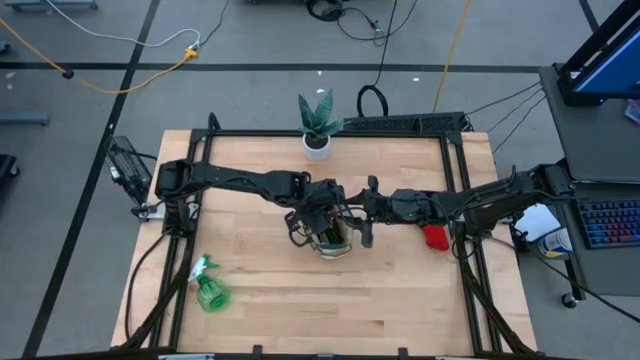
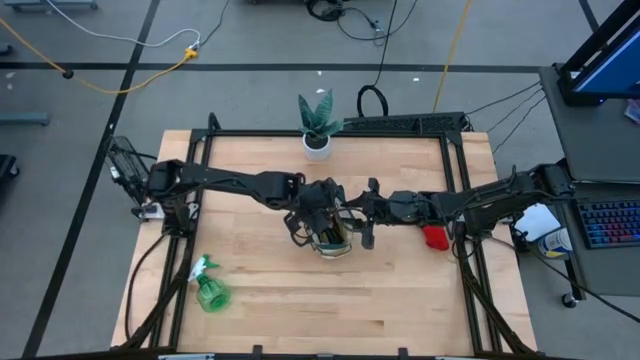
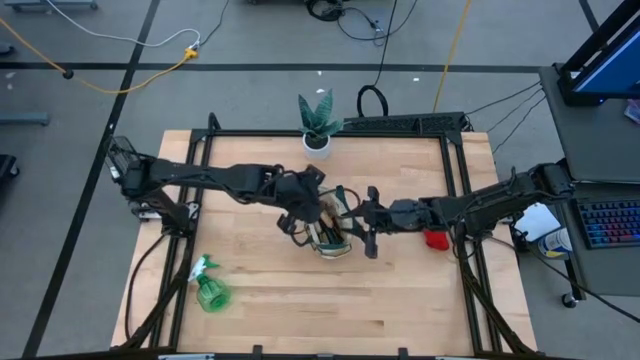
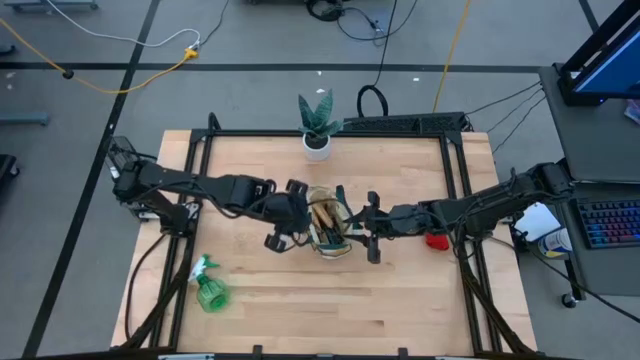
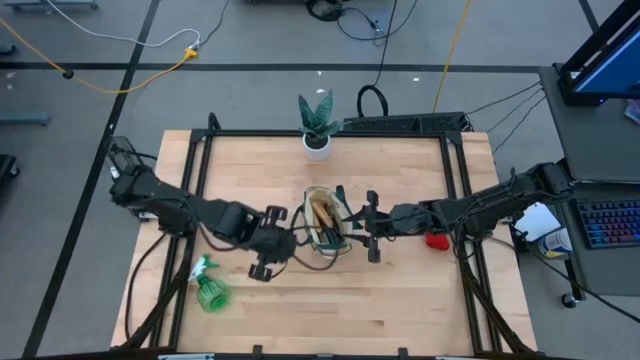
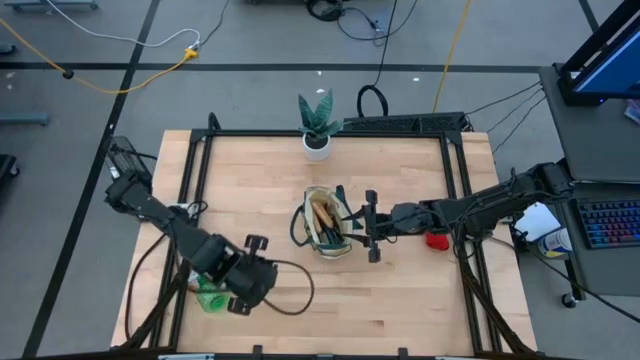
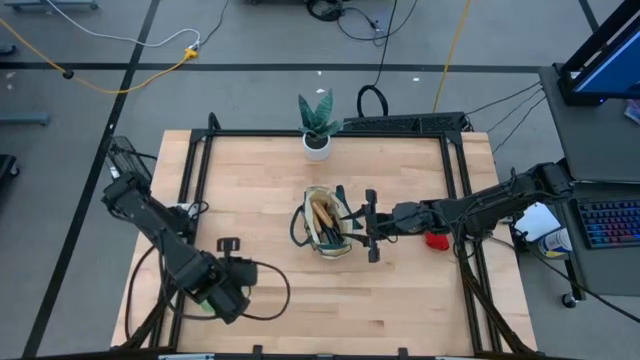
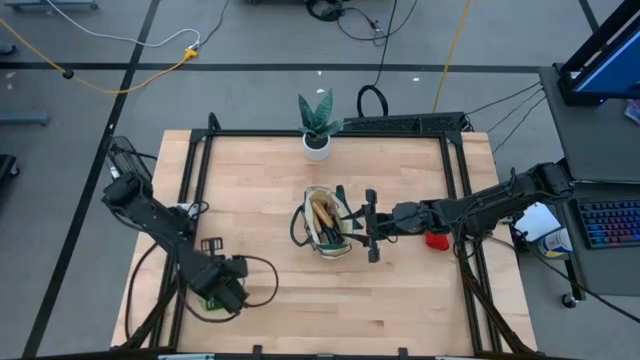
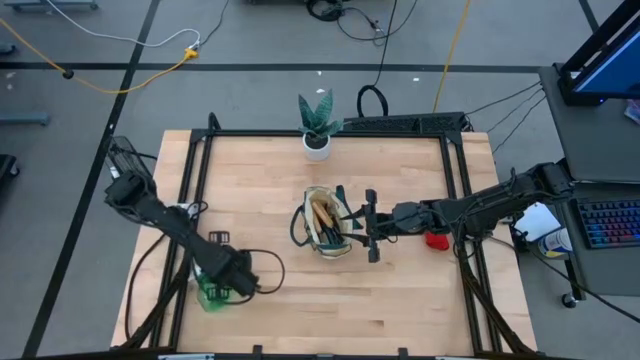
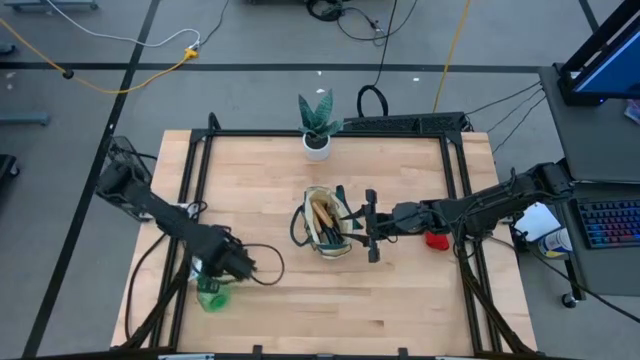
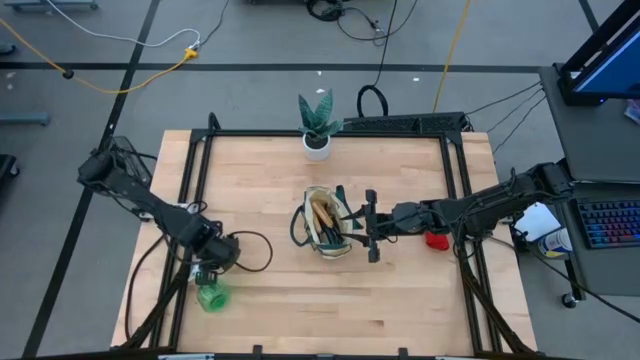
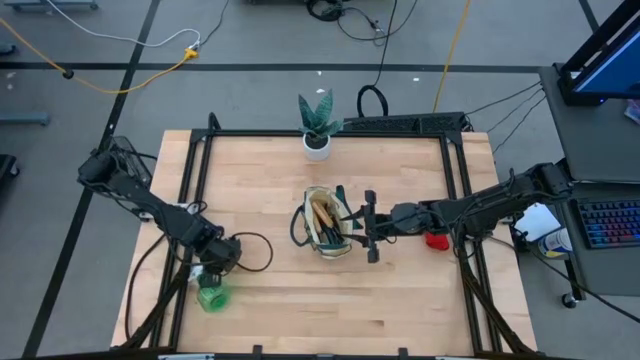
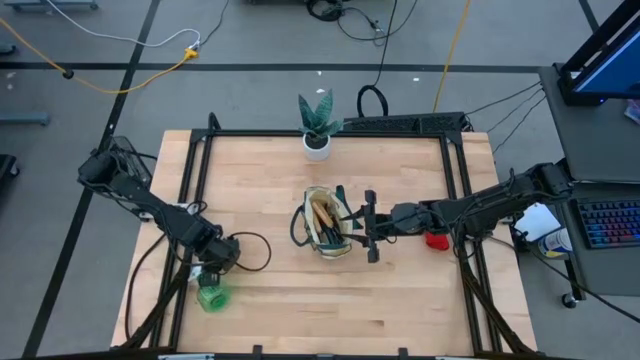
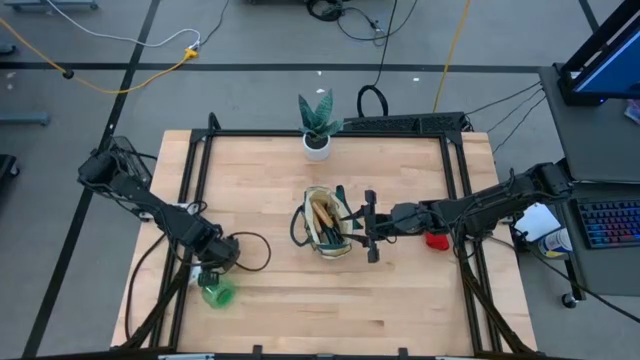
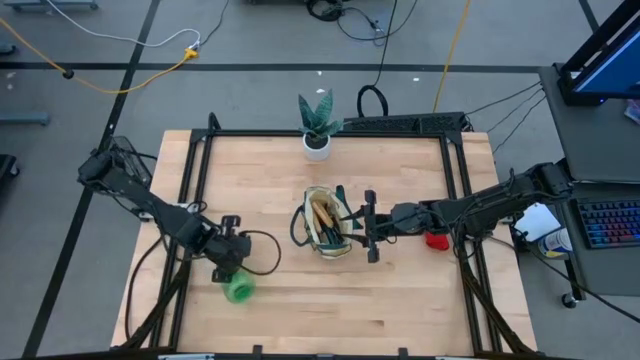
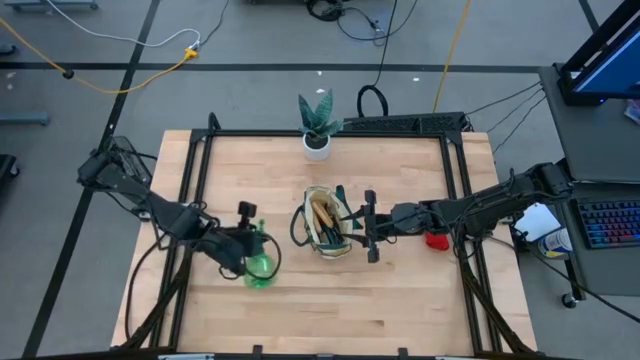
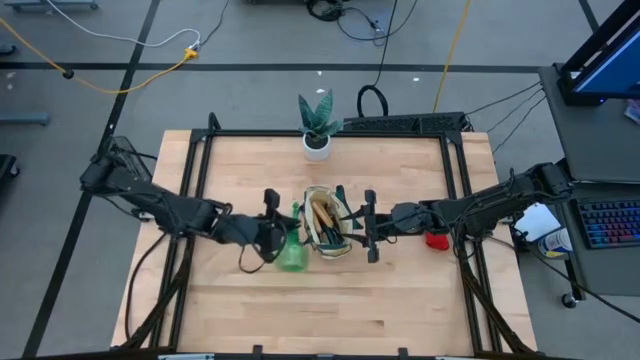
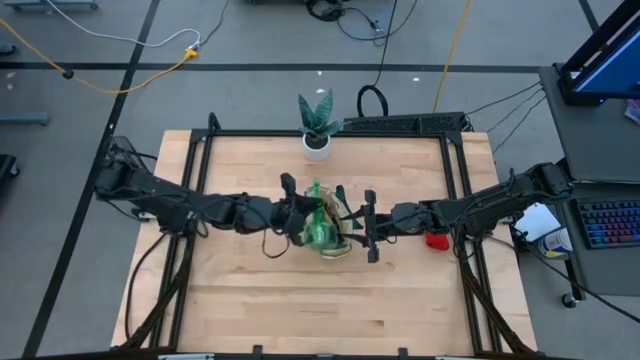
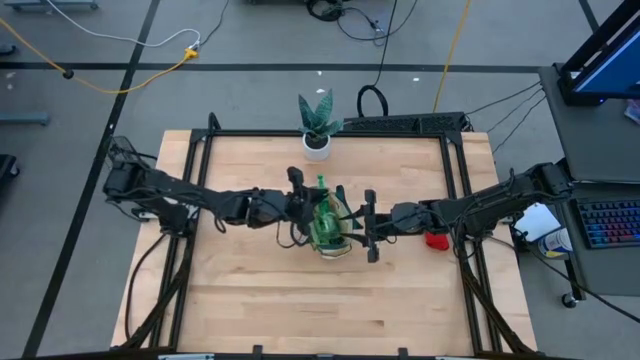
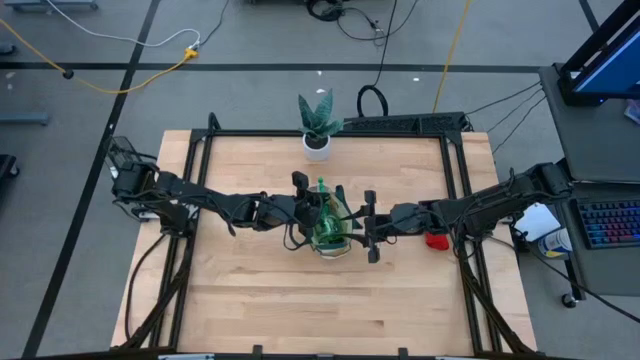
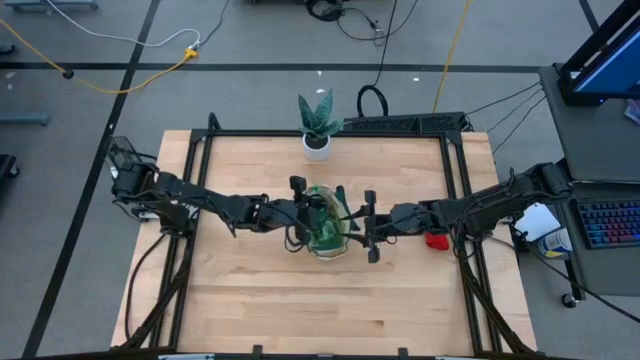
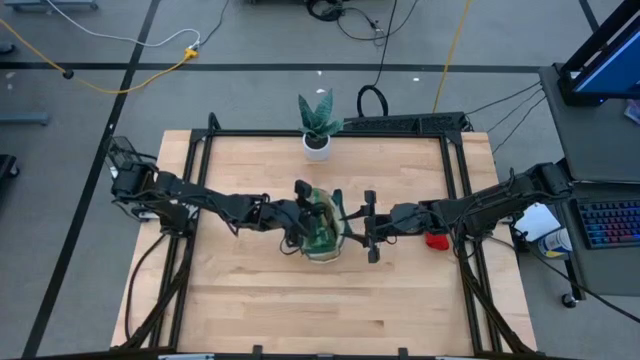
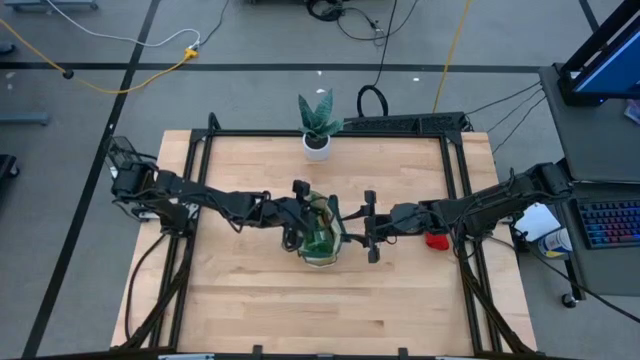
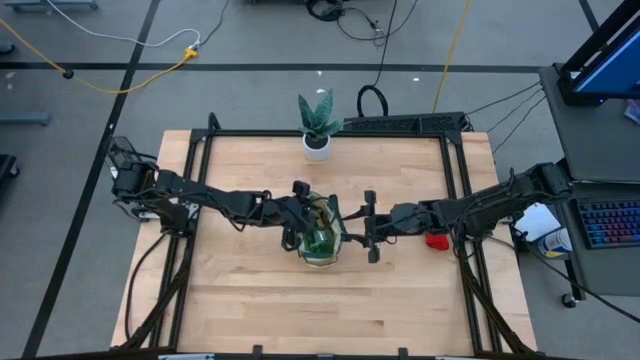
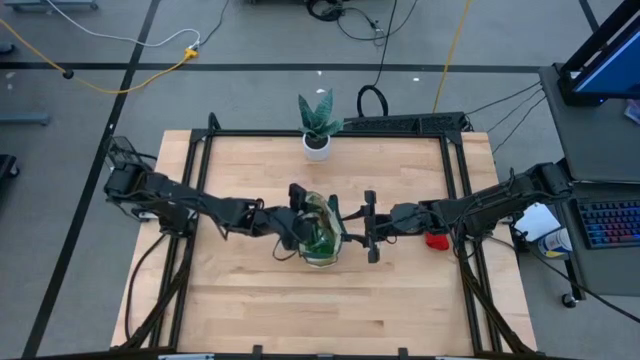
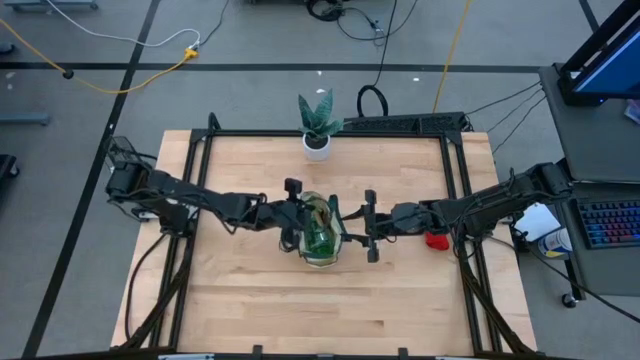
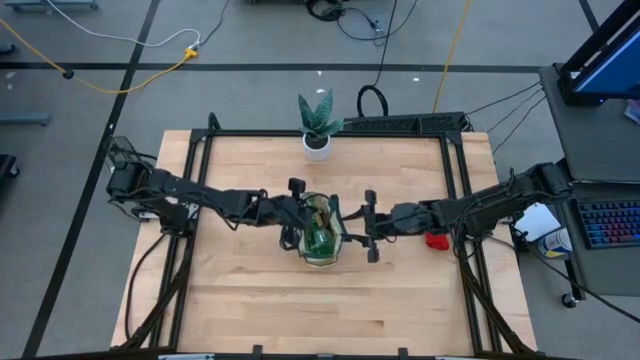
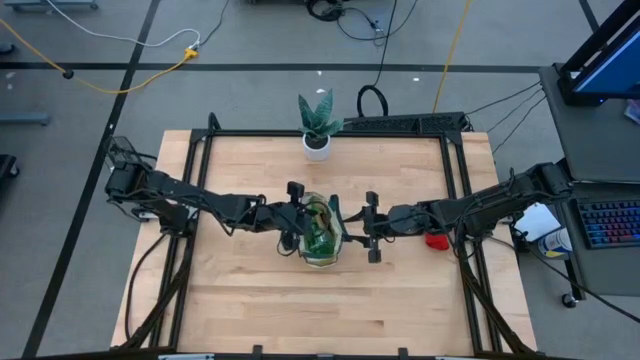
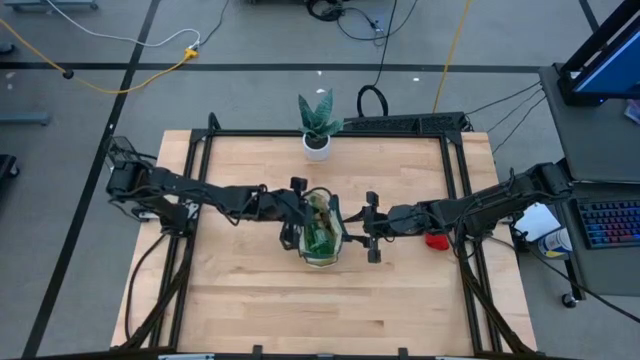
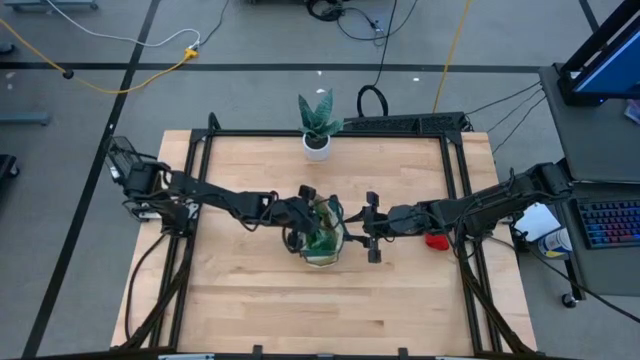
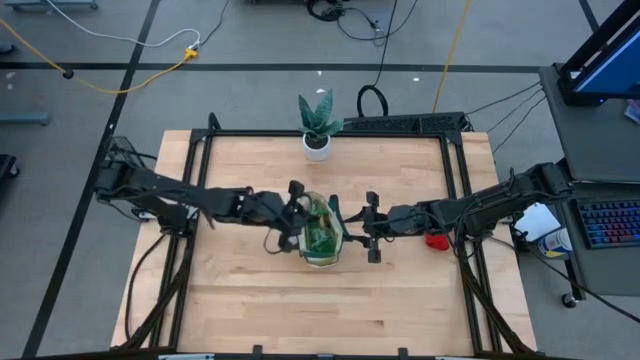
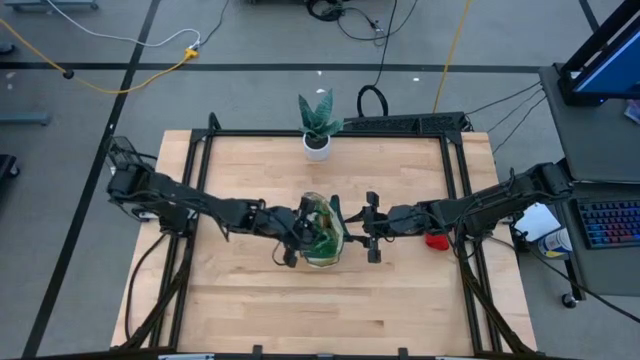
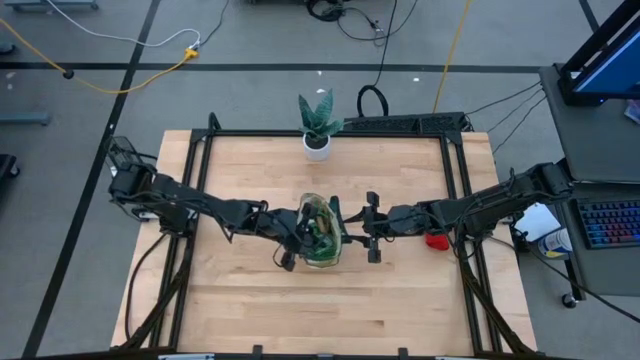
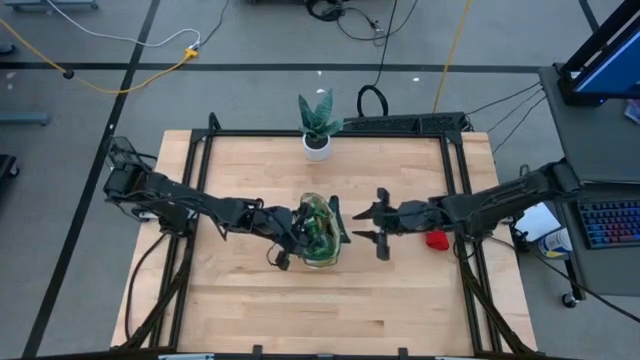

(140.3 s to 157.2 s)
Task: Pick & Place Garden tools in Gardening bag
Put the green spray bottle into the gardening bag

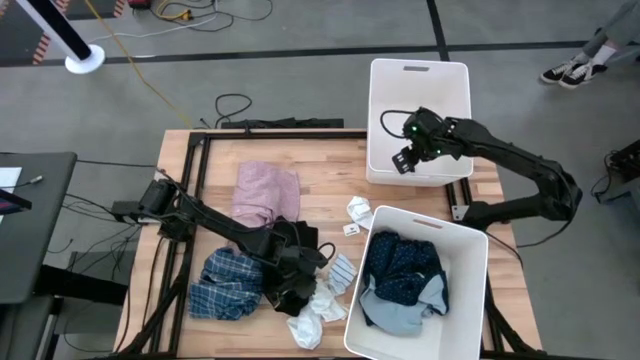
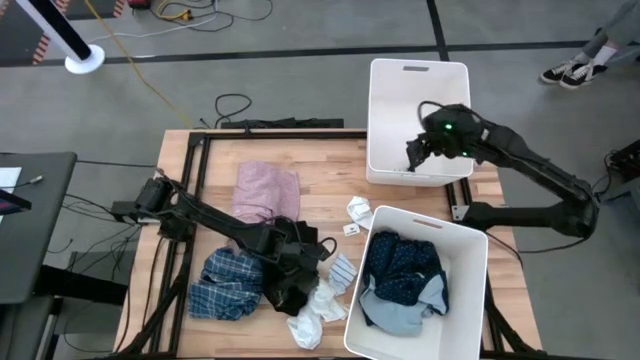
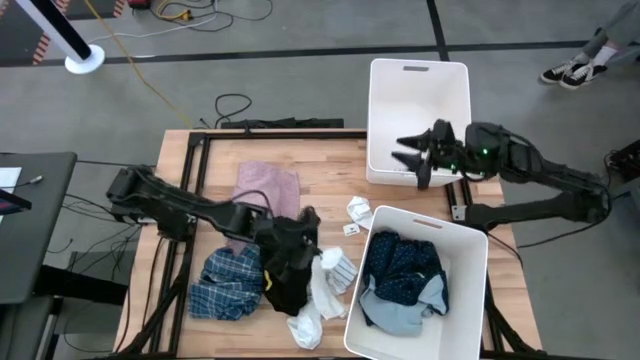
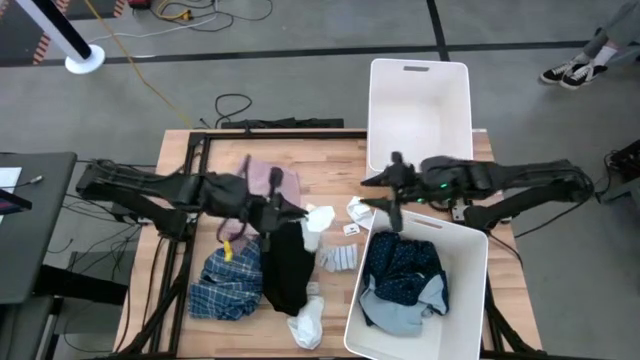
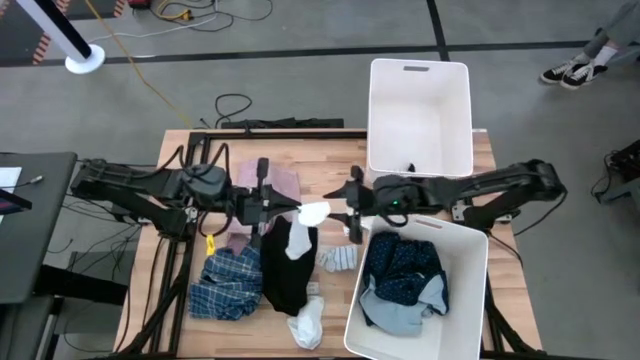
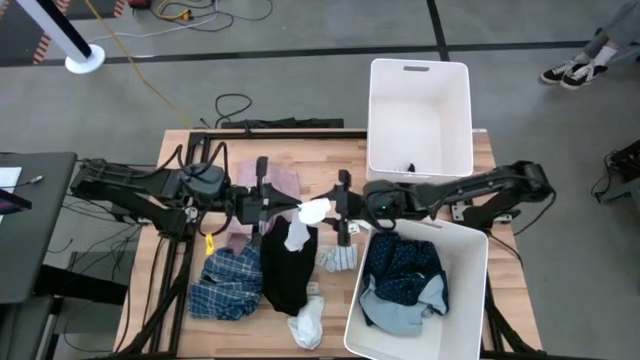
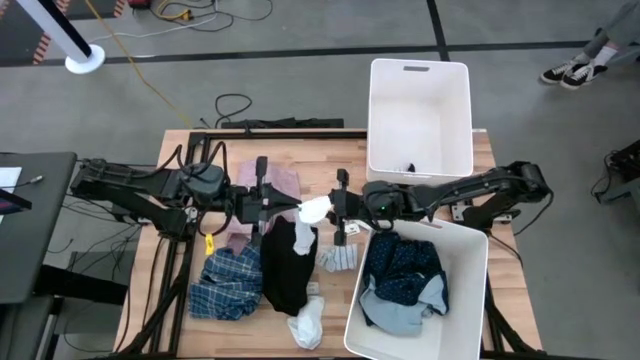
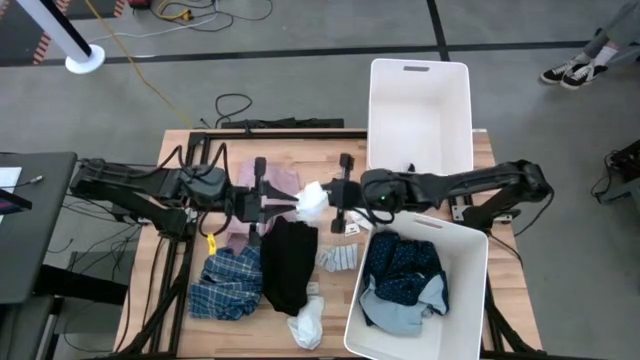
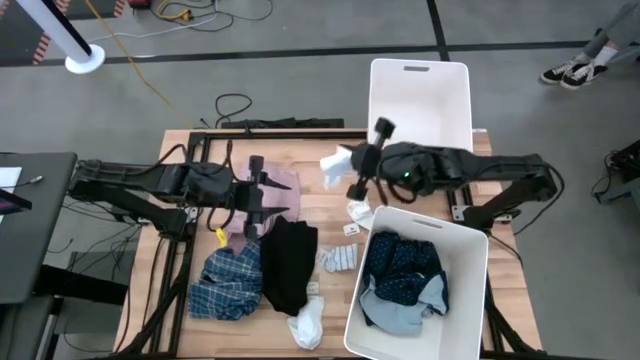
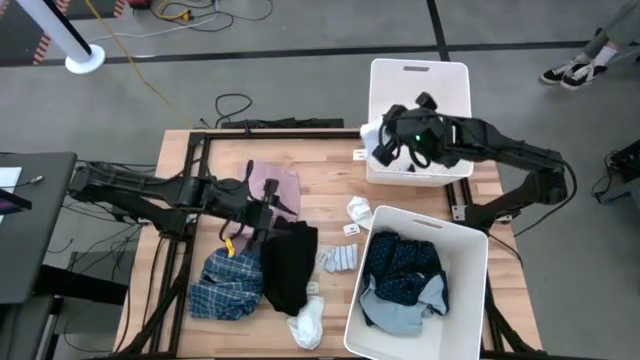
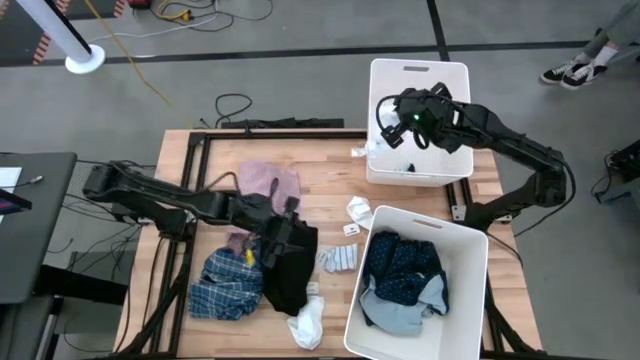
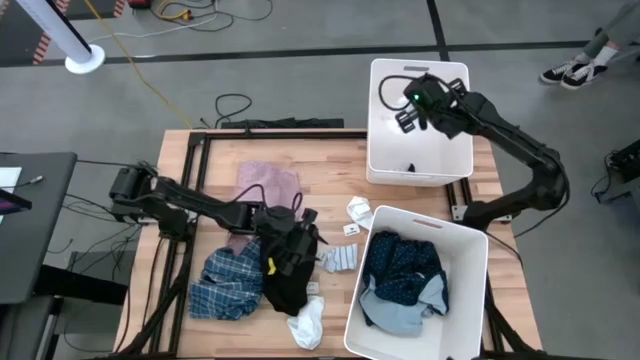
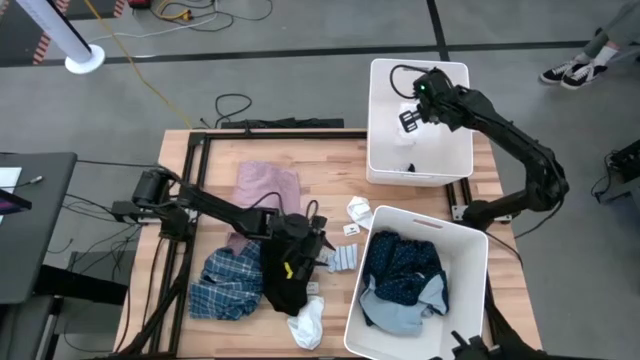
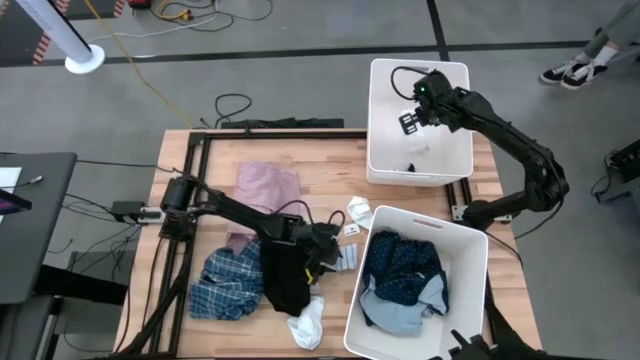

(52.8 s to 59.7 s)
Task: Sort clothes
Put the center white socks in the top laundry bin
